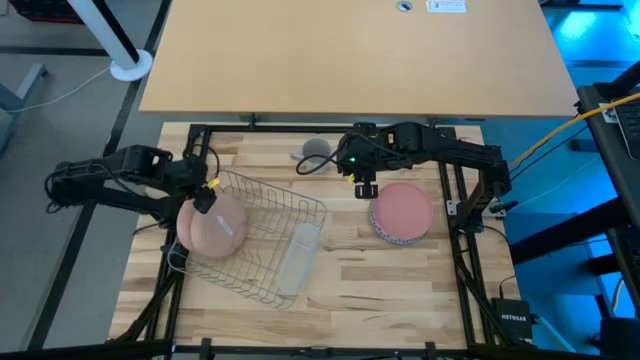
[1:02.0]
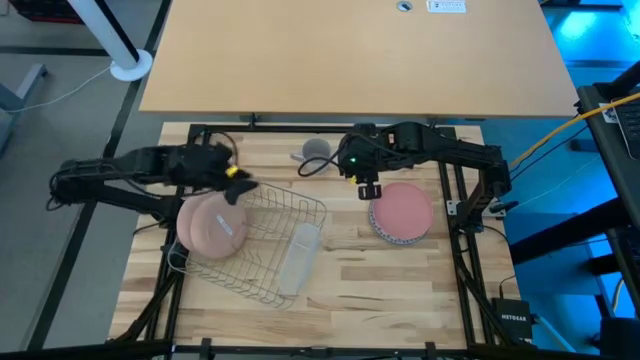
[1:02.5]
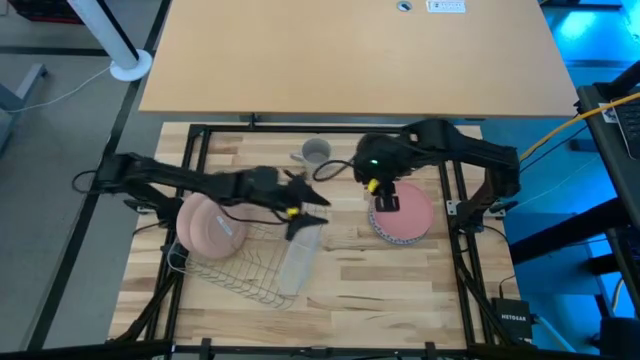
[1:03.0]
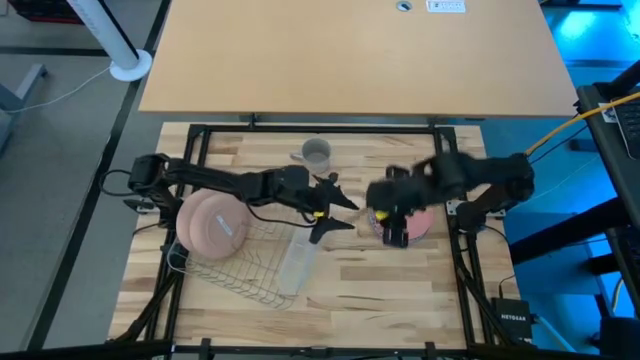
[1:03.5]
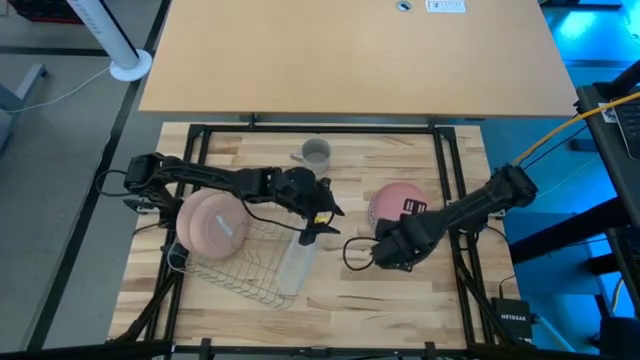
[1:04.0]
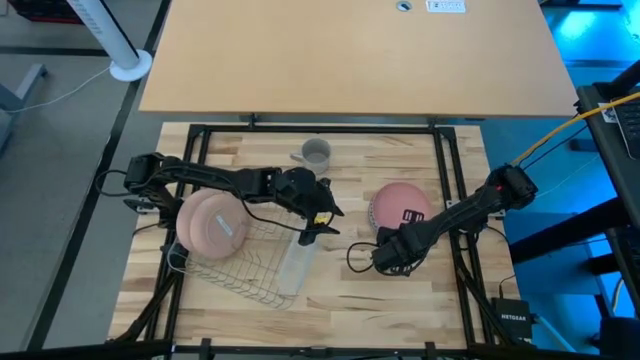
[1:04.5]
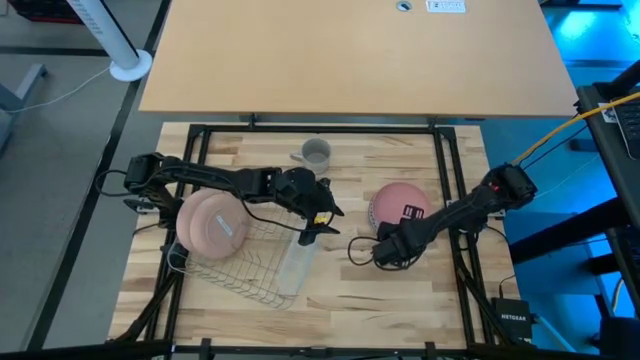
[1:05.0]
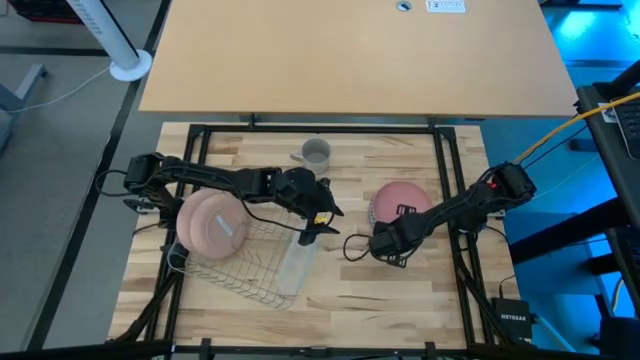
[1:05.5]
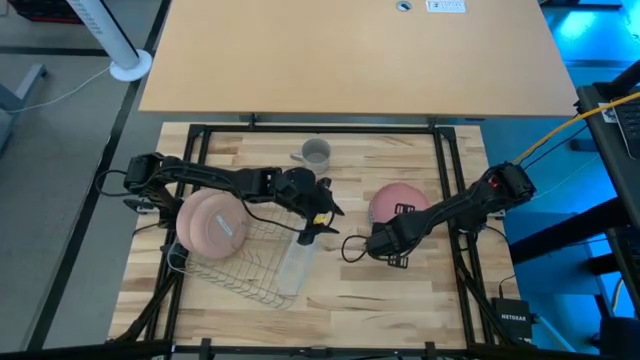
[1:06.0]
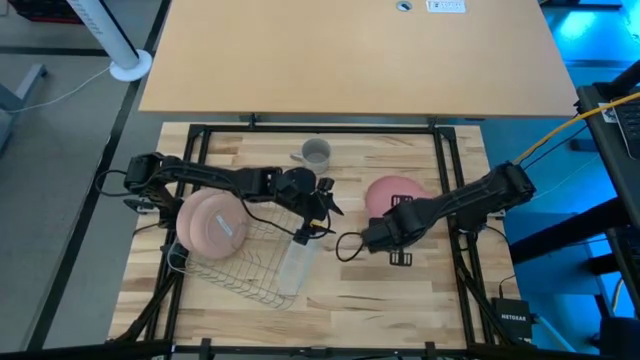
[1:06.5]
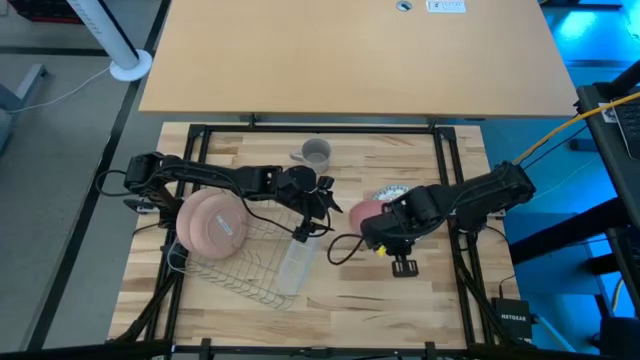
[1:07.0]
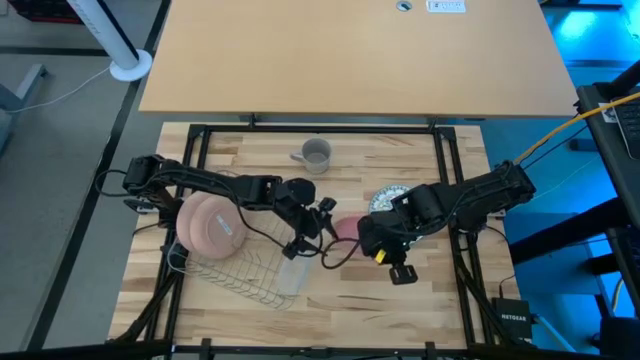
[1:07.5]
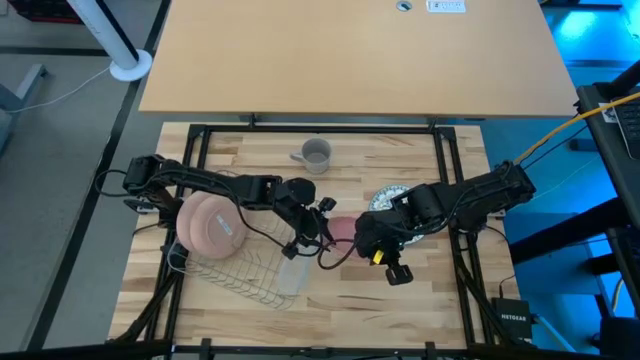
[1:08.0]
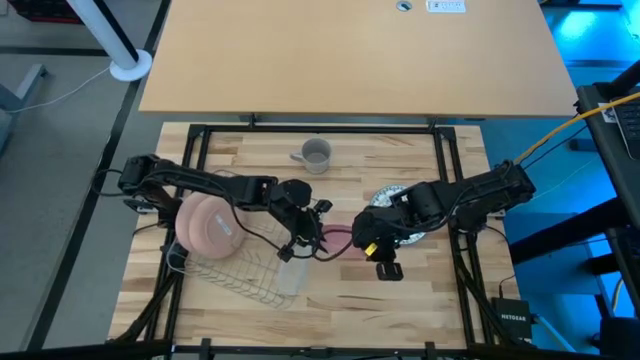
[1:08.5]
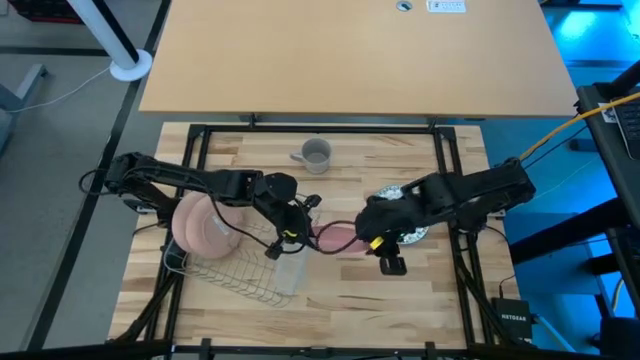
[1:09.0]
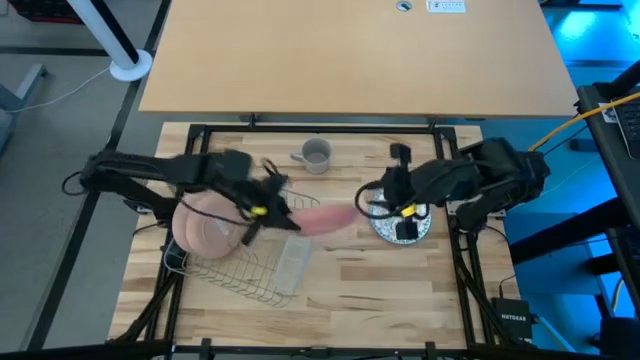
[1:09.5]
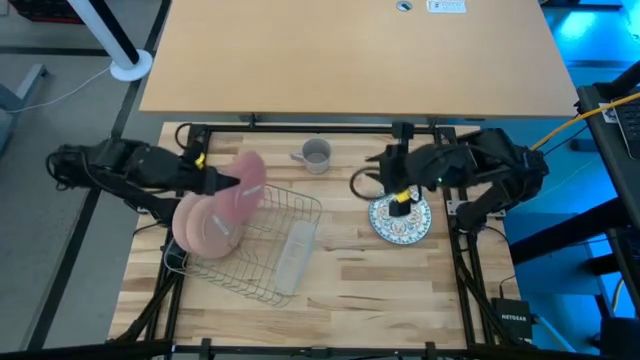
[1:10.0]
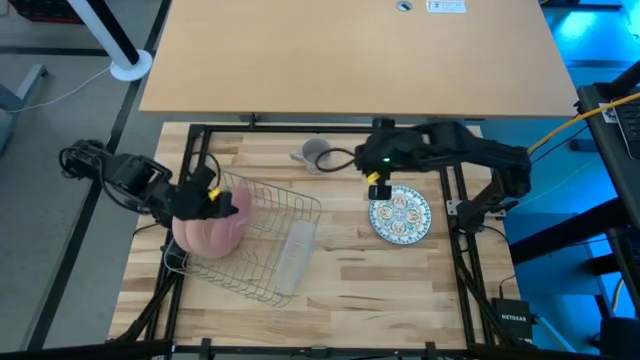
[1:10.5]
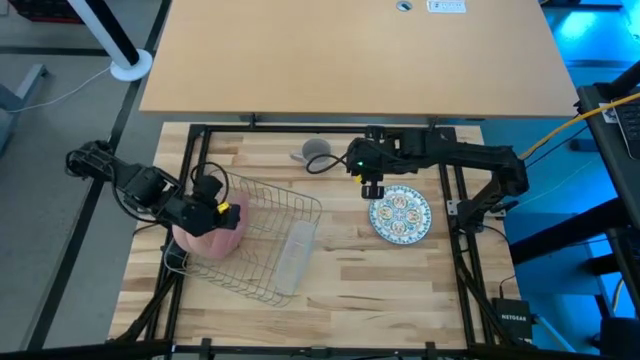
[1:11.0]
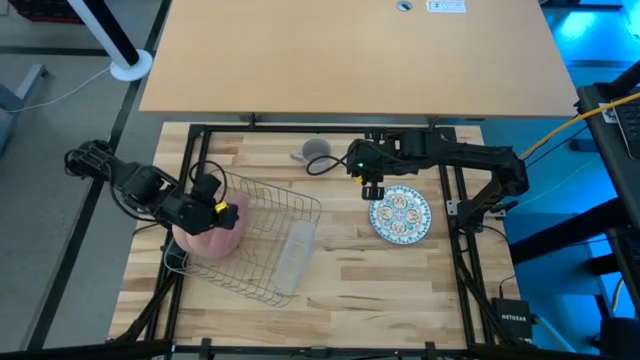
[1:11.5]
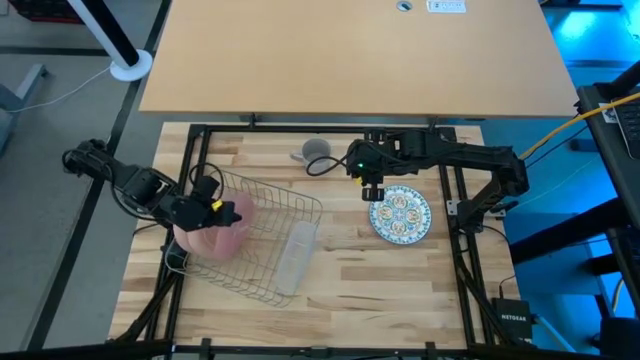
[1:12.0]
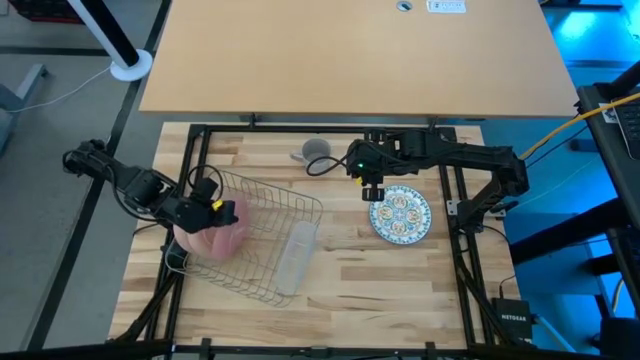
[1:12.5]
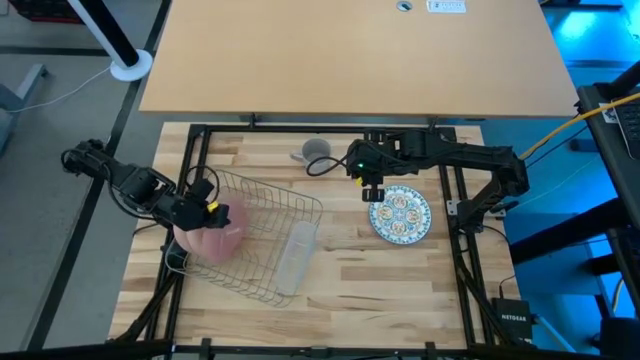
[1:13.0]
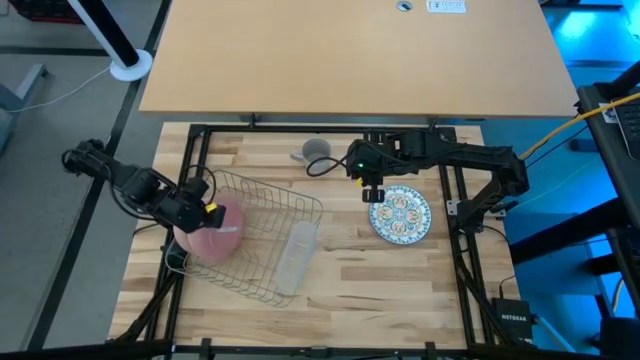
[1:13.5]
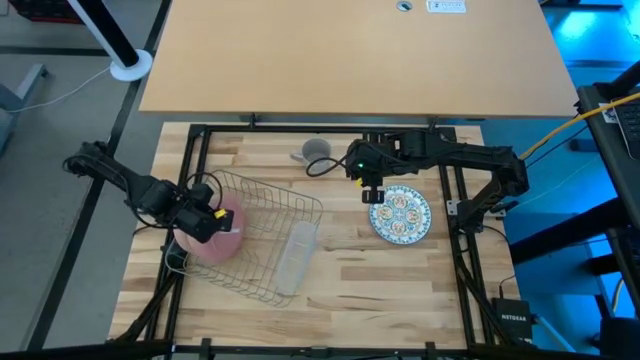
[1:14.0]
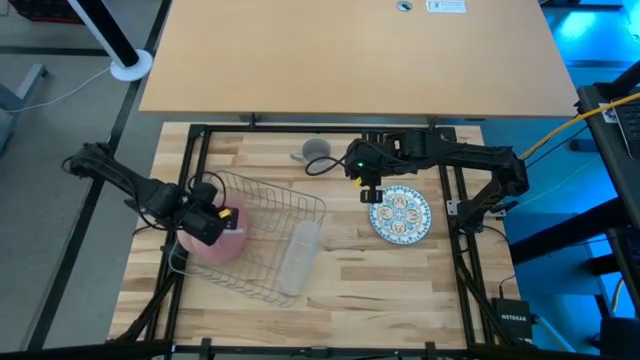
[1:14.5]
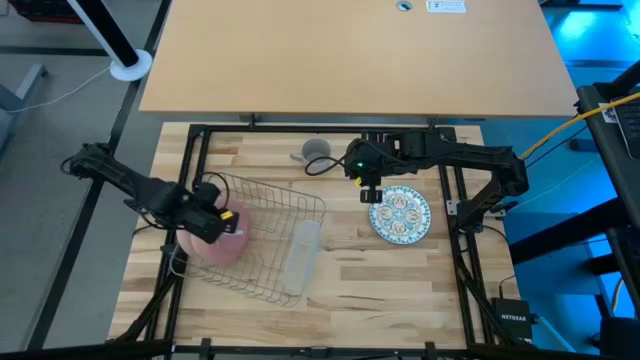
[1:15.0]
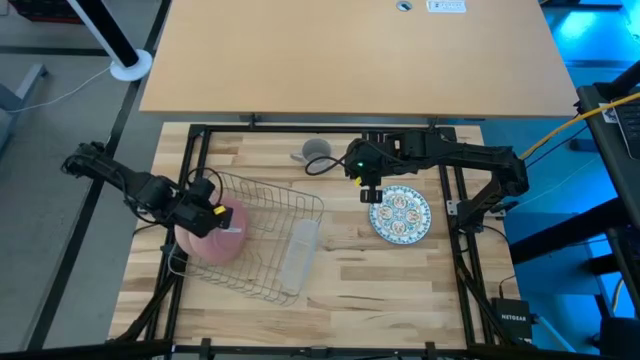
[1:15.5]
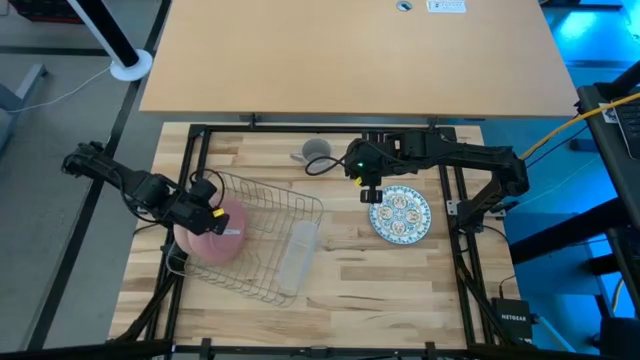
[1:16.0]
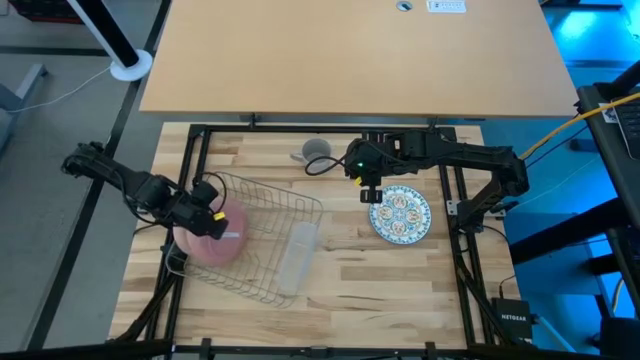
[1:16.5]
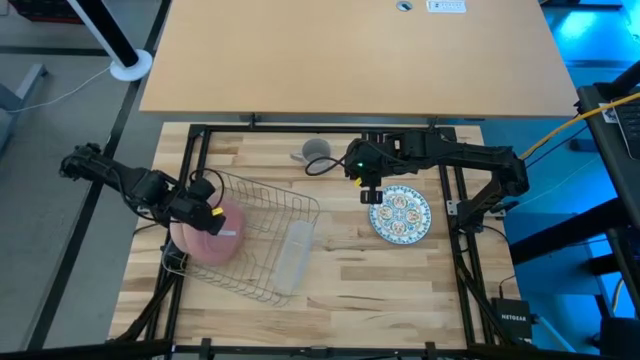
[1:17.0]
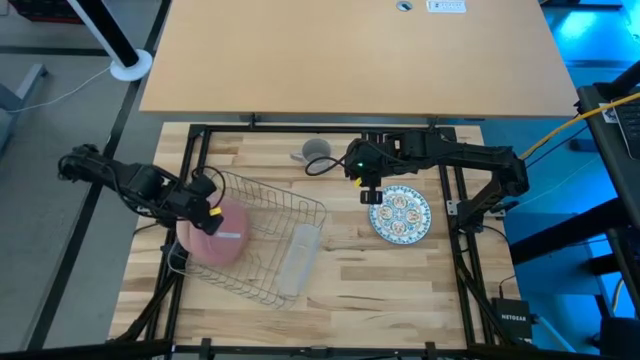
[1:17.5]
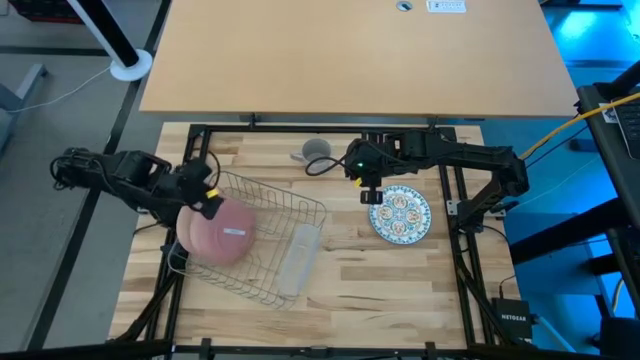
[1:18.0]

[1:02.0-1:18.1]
Task: Sort dishes
Put the dark pink plate in the dish rack
